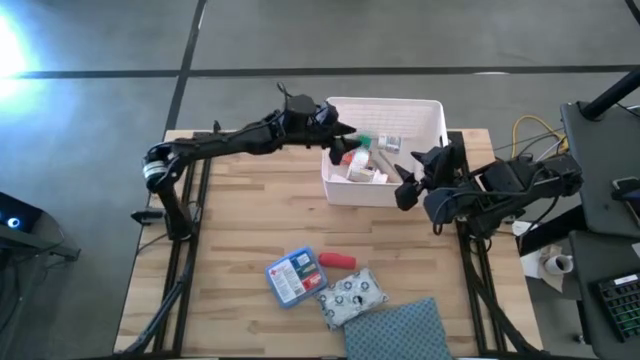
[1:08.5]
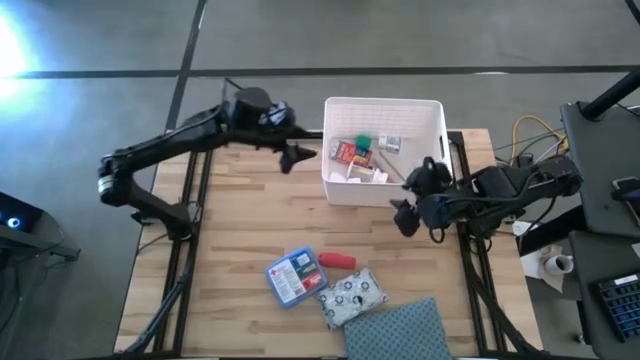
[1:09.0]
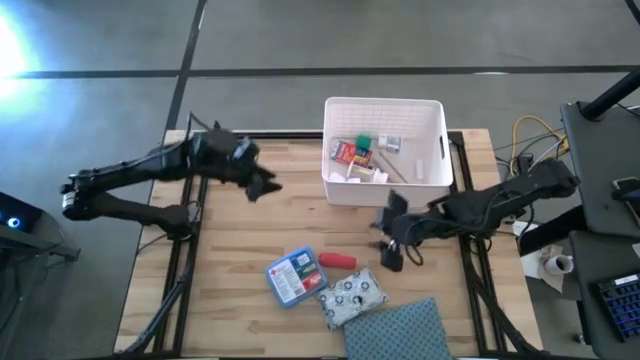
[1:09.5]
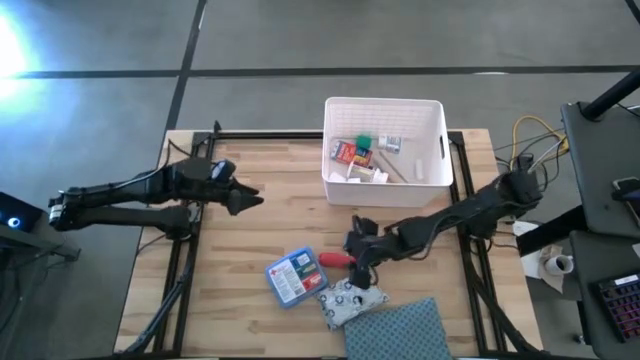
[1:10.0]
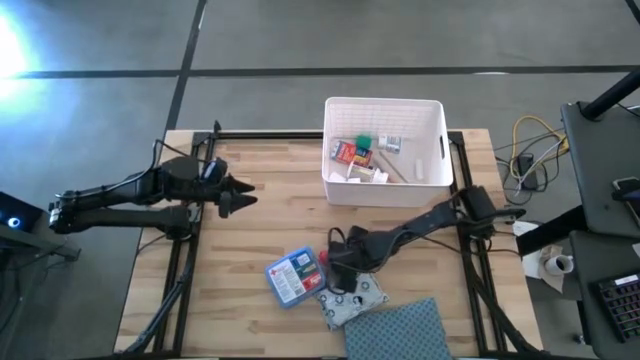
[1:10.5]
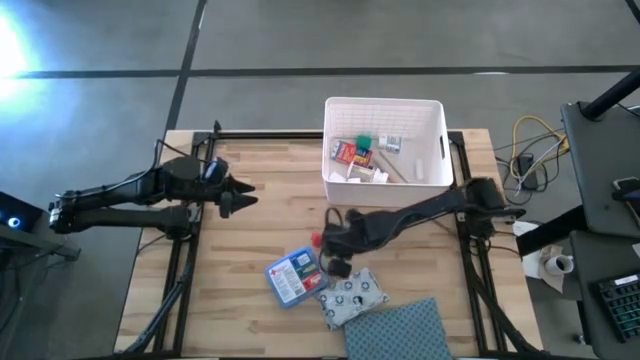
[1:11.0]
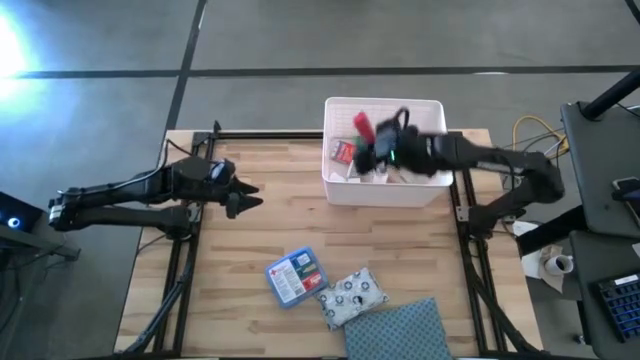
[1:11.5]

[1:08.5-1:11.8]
Task: Pick & place medical supplies in basket/bin
Put the red bandage into the white bin

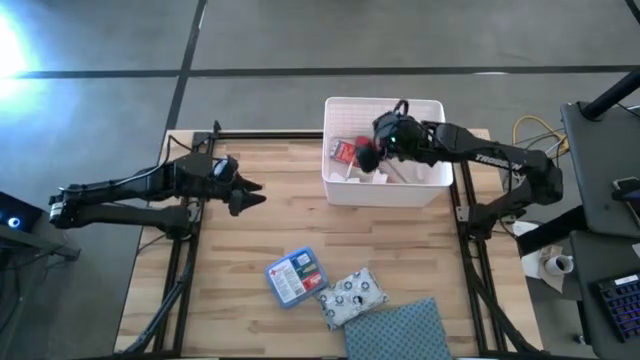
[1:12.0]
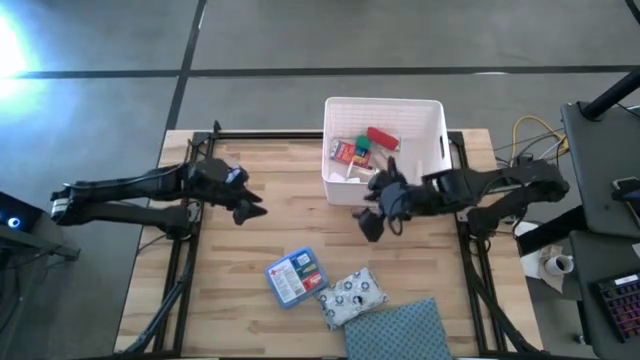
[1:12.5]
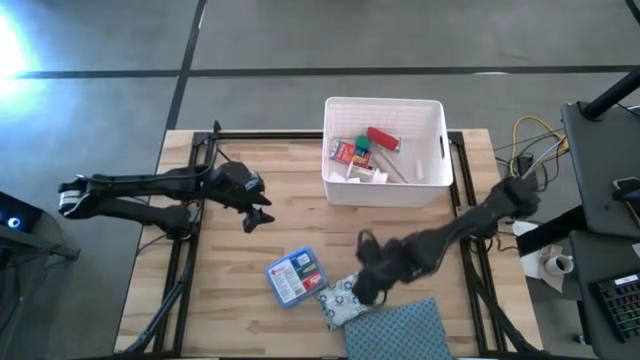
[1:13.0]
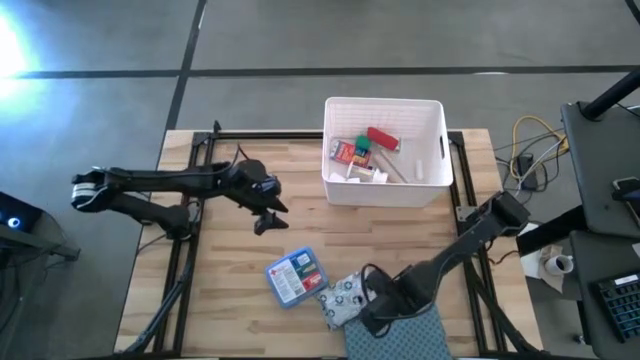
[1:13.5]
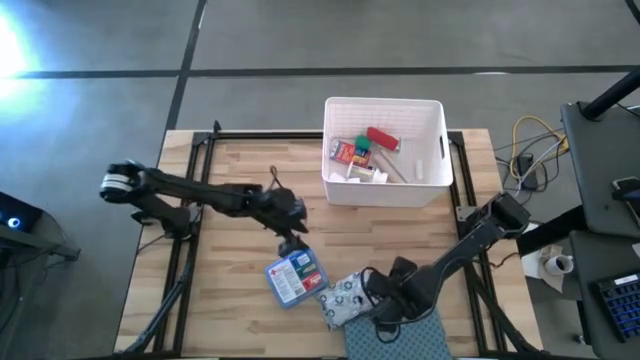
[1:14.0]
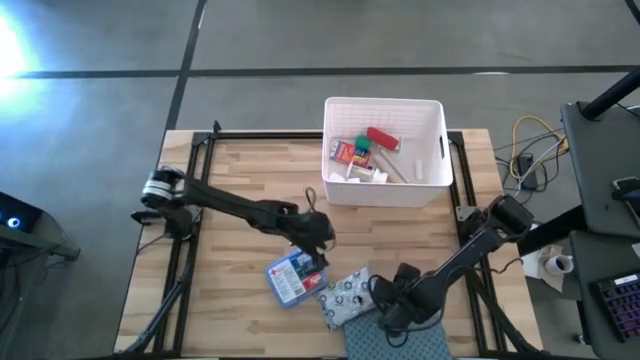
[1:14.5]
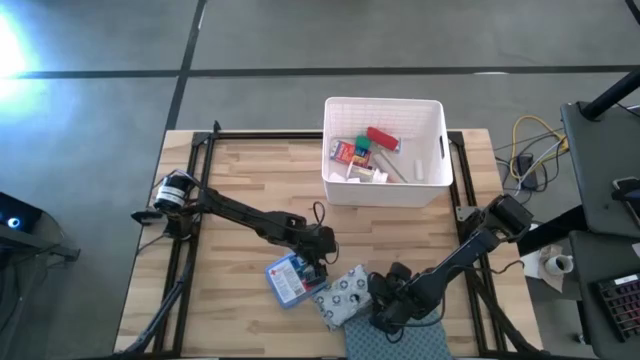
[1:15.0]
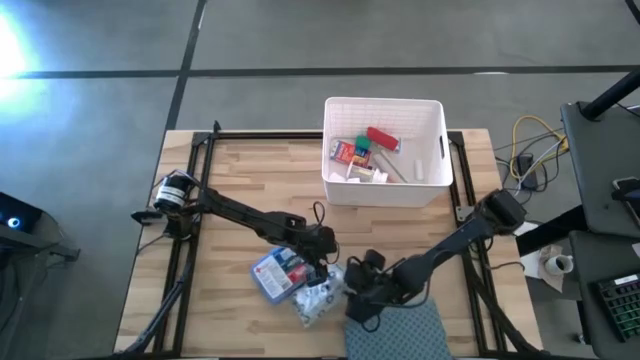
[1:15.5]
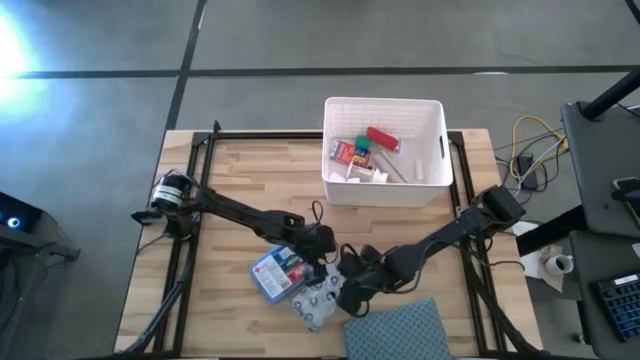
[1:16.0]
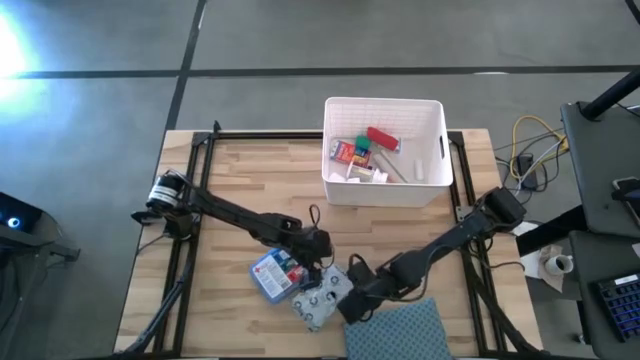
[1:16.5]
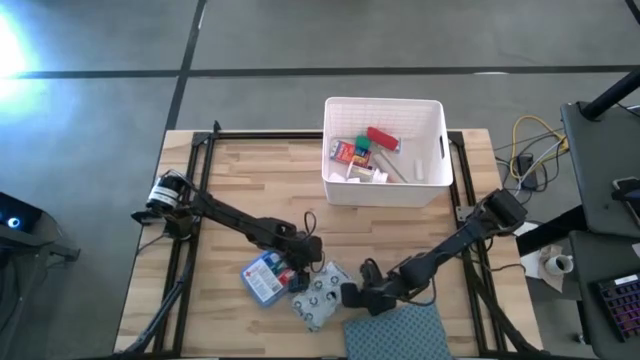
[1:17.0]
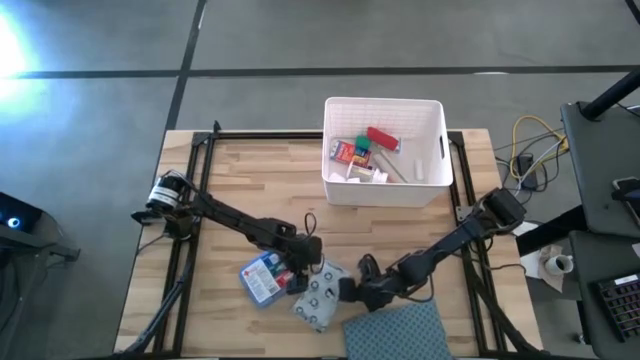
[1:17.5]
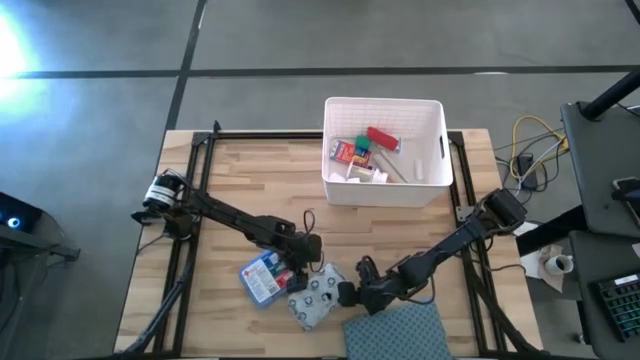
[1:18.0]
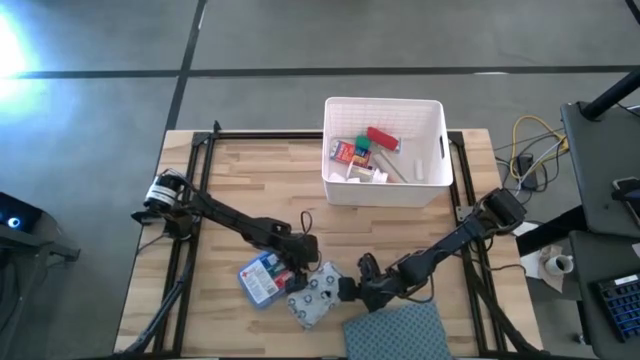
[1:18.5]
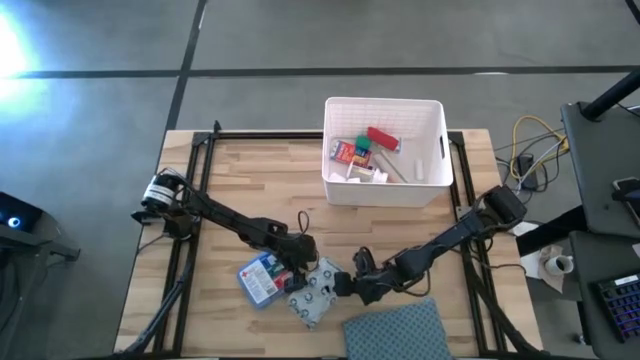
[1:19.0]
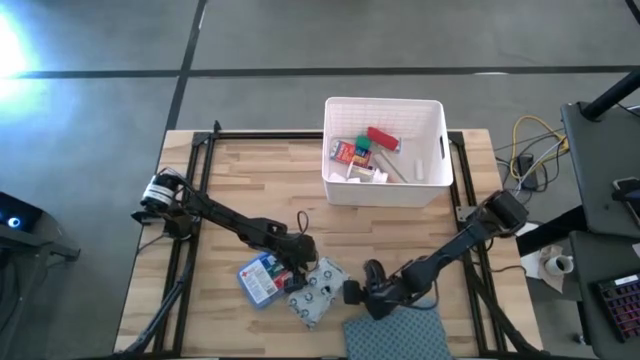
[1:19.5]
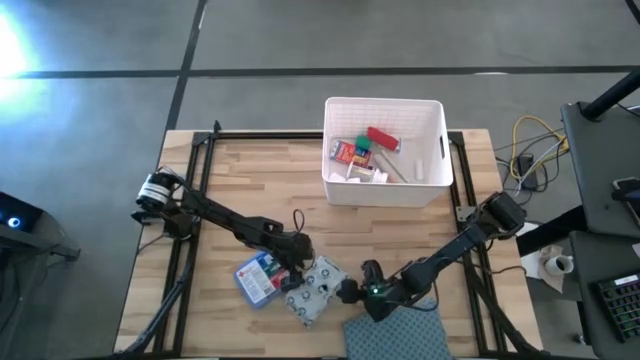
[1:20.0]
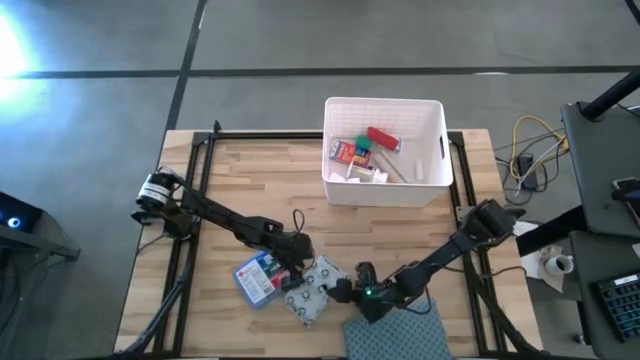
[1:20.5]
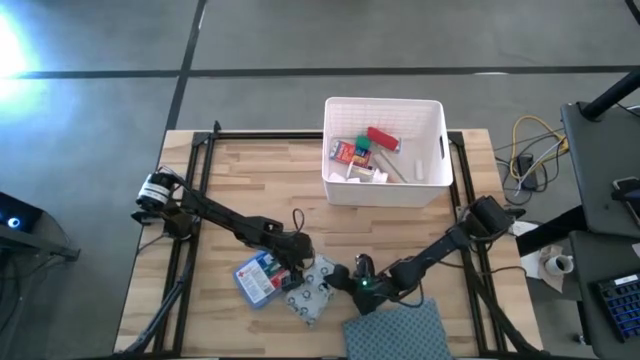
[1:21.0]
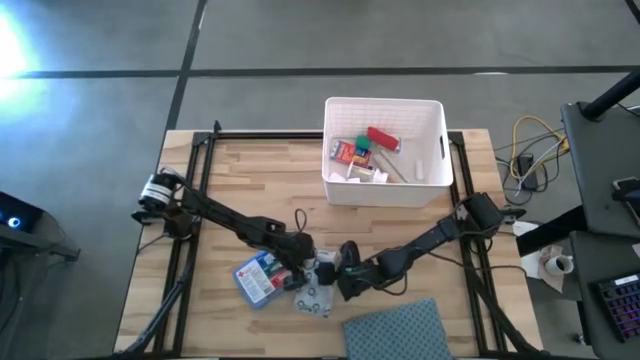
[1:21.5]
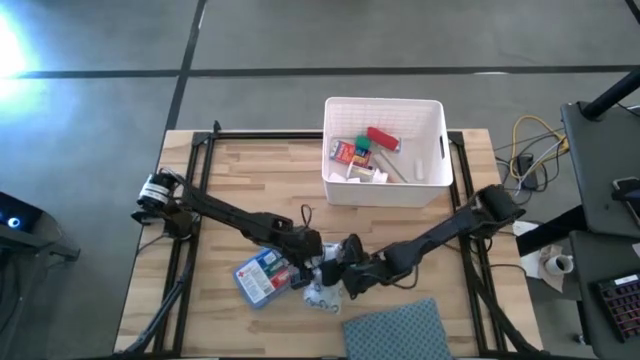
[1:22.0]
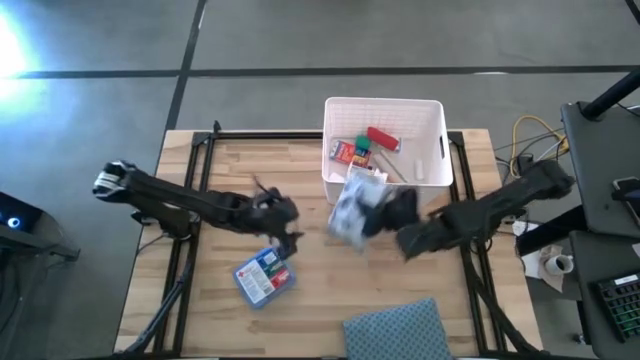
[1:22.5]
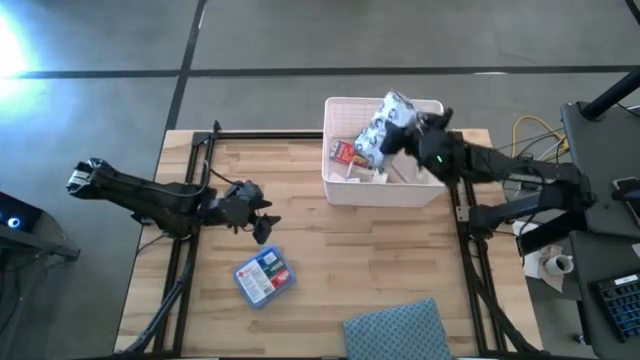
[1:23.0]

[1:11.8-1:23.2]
Put the white mailer bag into the white bin

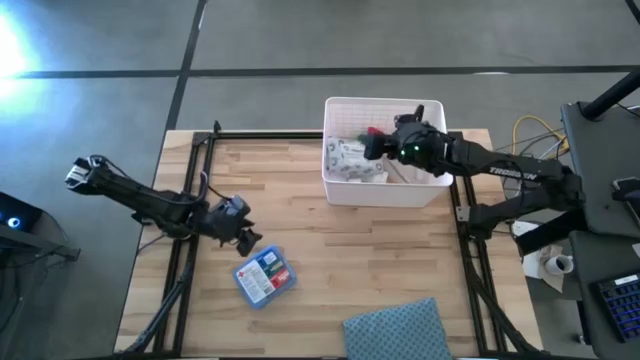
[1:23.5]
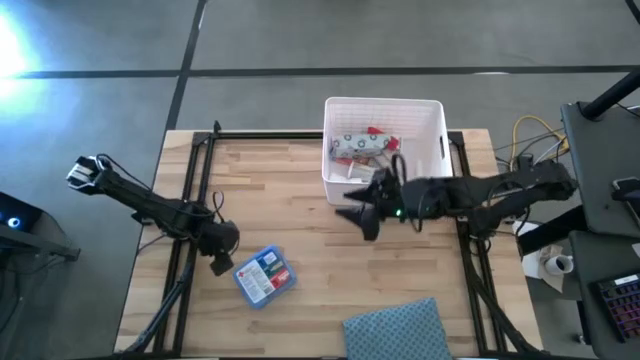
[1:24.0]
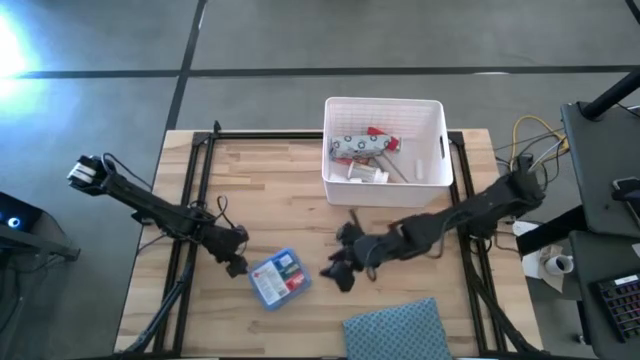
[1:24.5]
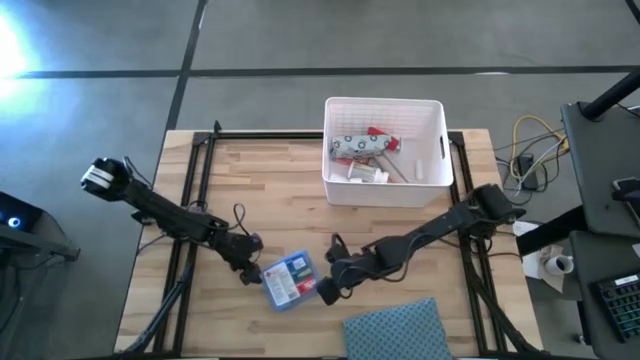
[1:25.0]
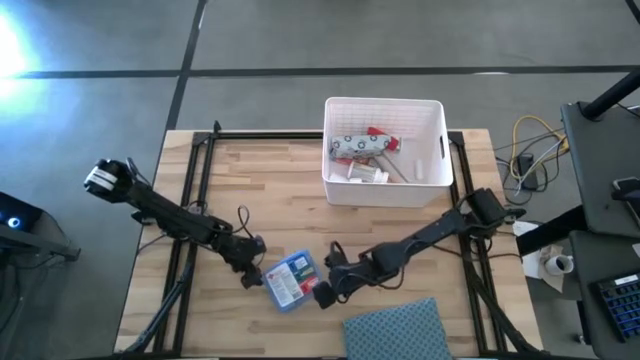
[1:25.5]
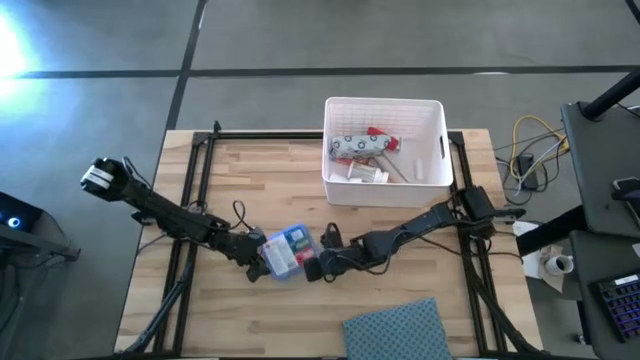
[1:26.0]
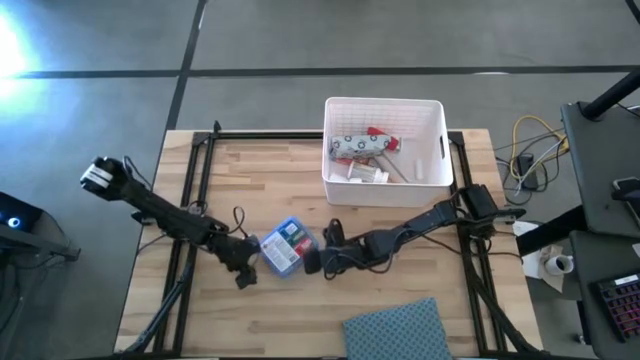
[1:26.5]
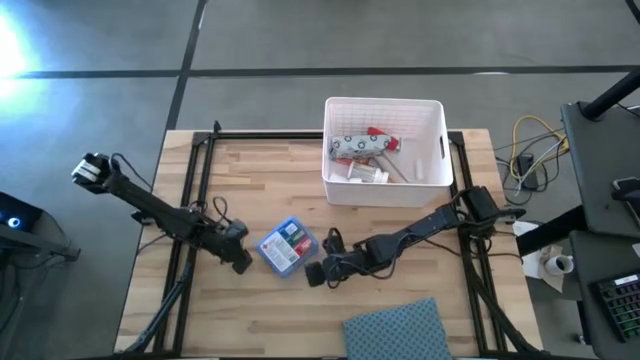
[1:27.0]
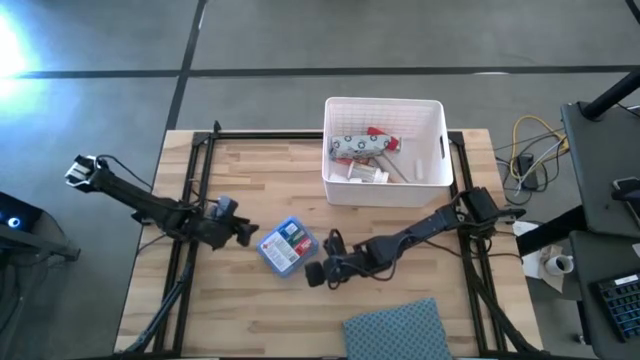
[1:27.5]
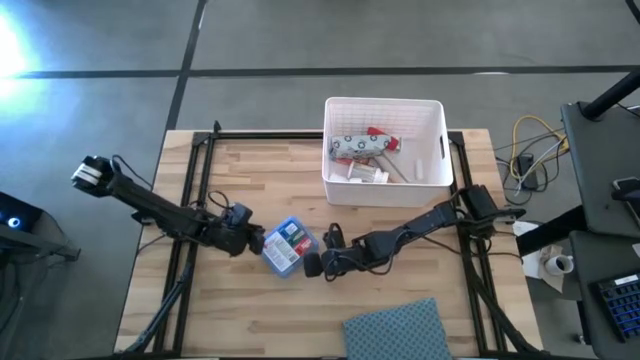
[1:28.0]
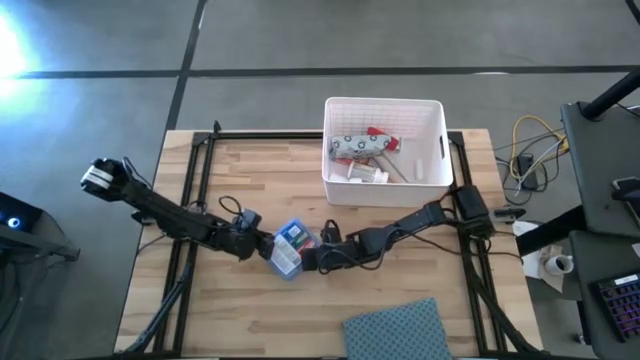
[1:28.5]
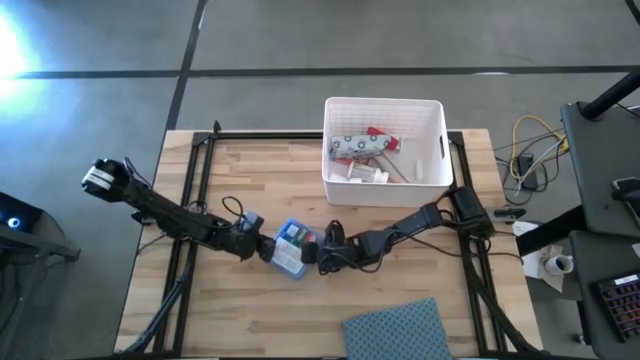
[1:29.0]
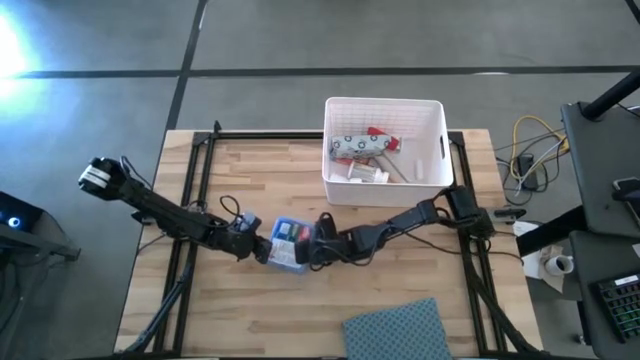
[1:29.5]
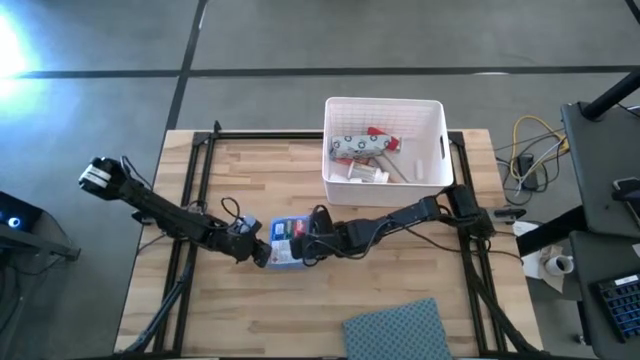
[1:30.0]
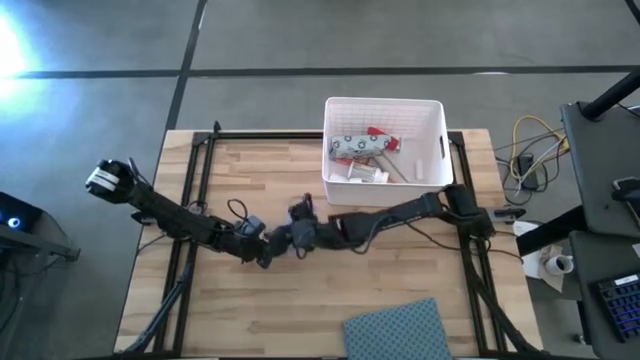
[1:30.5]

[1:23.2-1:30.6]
Put the blue first aid kit box into the white bin
